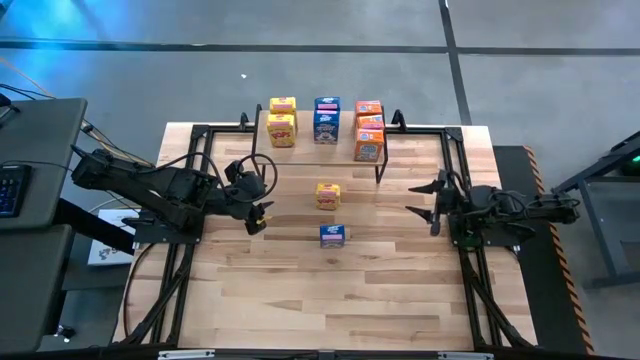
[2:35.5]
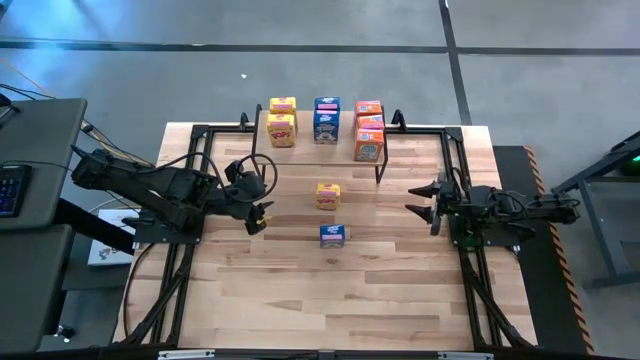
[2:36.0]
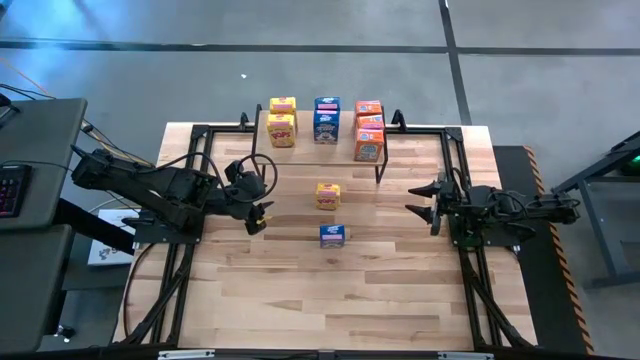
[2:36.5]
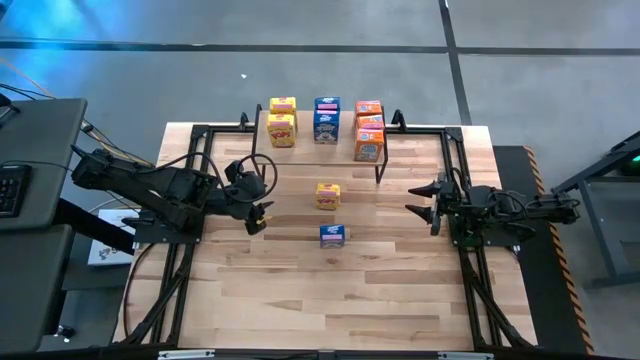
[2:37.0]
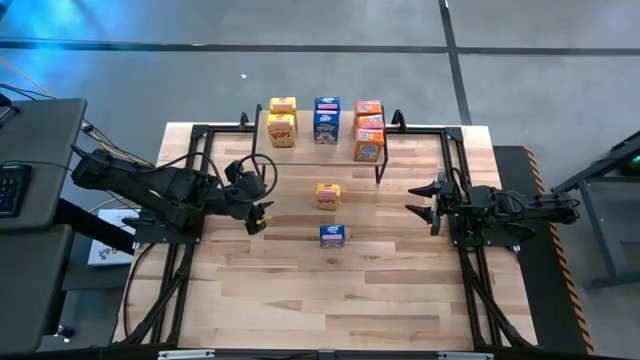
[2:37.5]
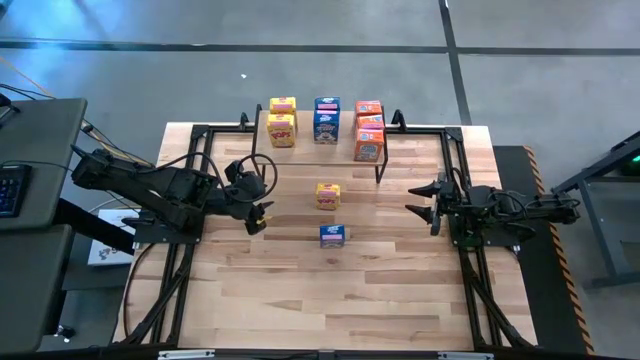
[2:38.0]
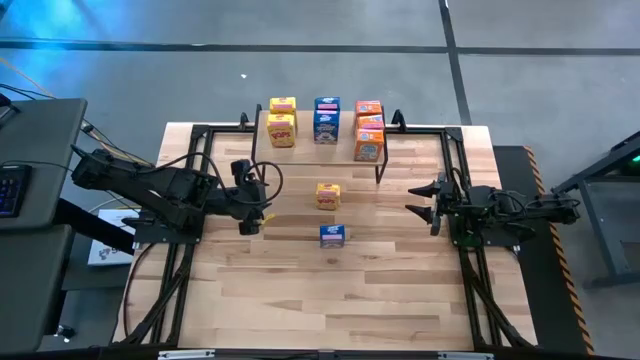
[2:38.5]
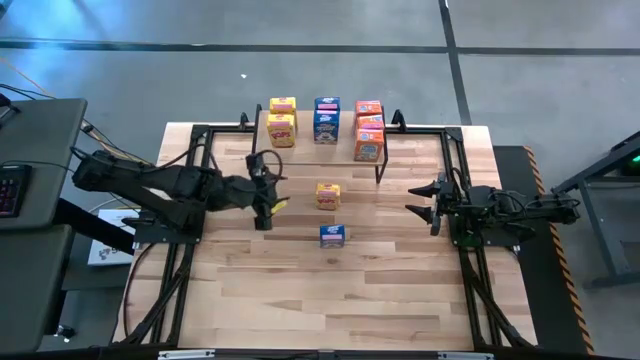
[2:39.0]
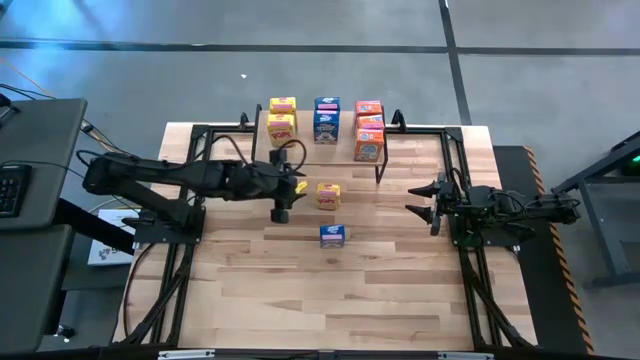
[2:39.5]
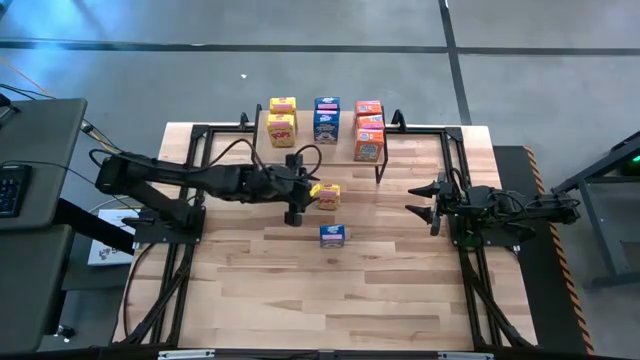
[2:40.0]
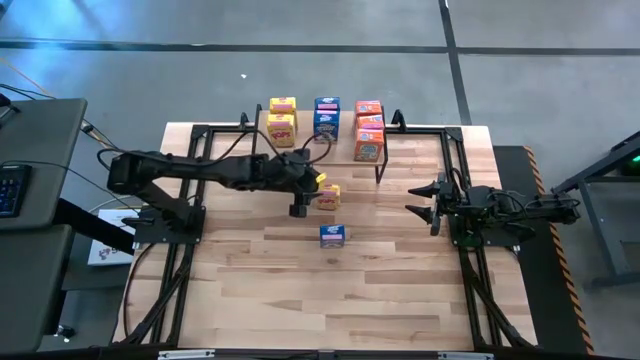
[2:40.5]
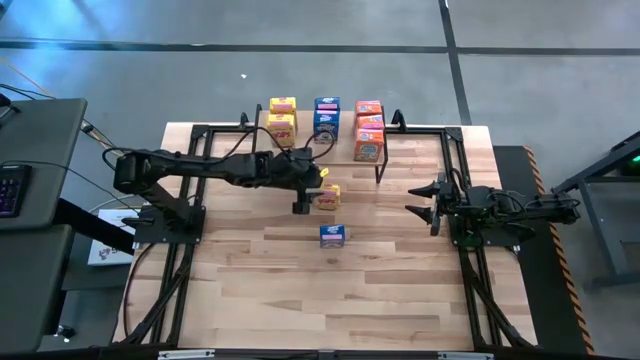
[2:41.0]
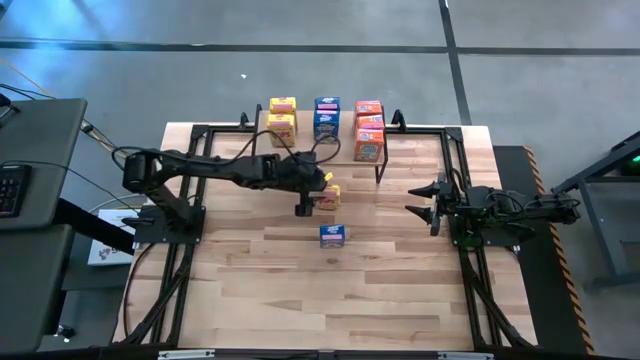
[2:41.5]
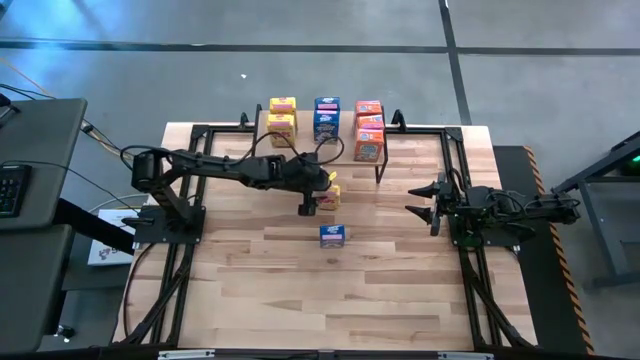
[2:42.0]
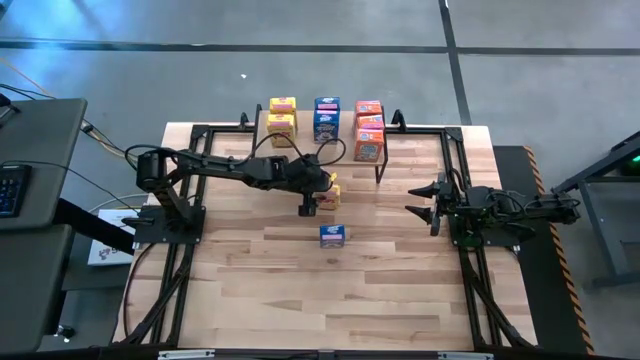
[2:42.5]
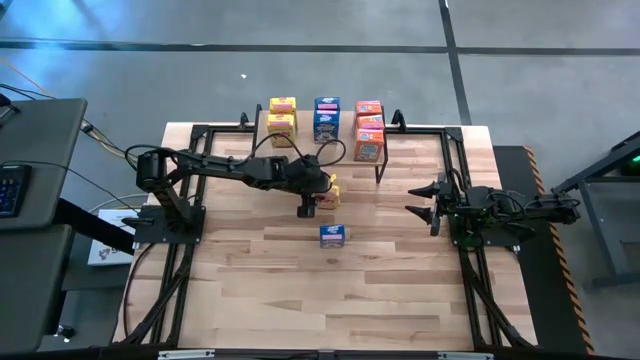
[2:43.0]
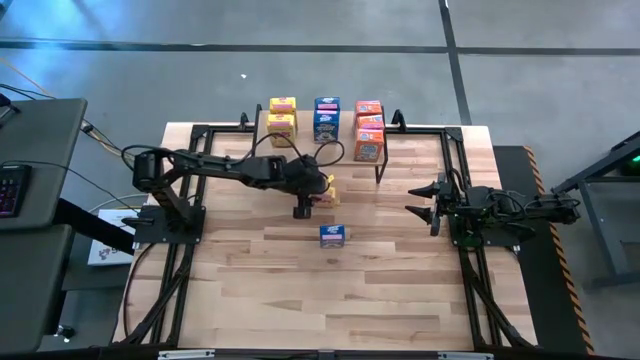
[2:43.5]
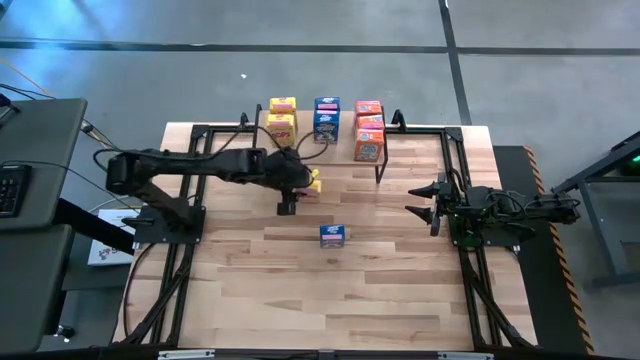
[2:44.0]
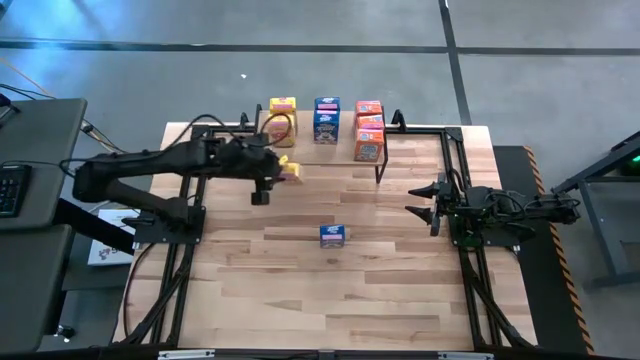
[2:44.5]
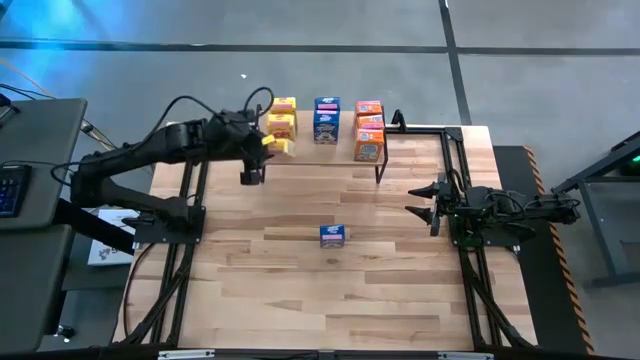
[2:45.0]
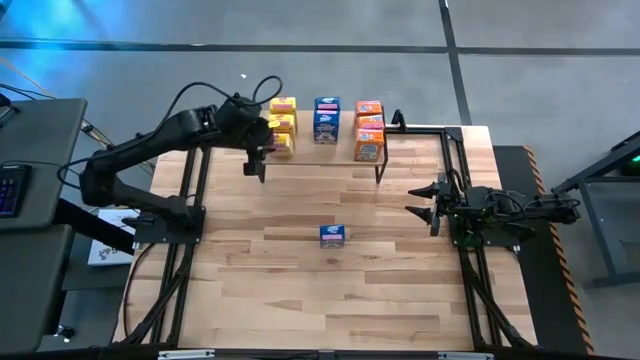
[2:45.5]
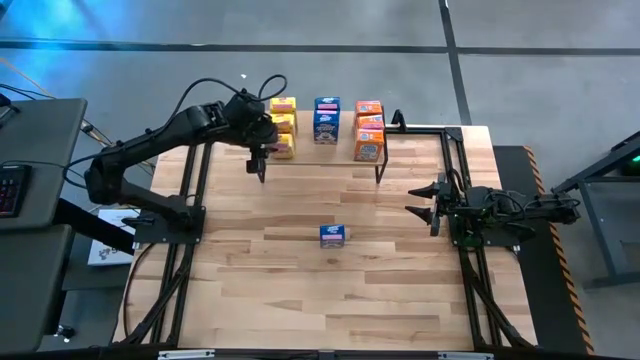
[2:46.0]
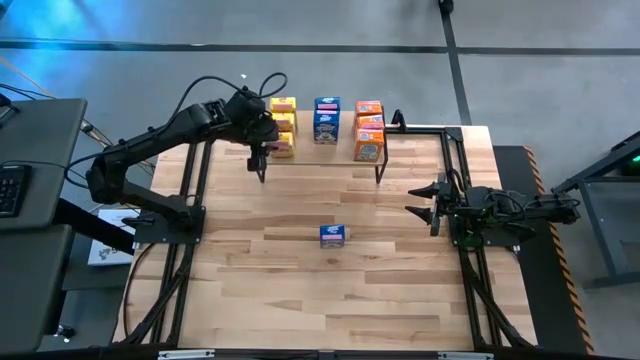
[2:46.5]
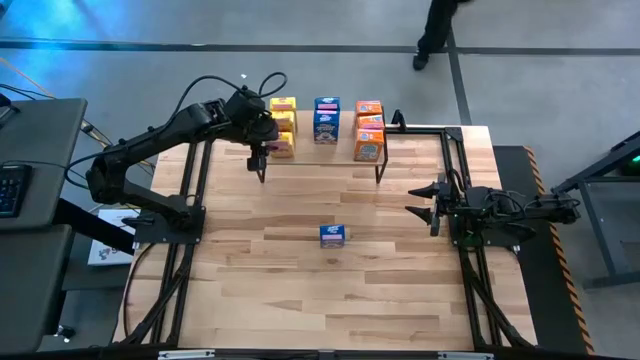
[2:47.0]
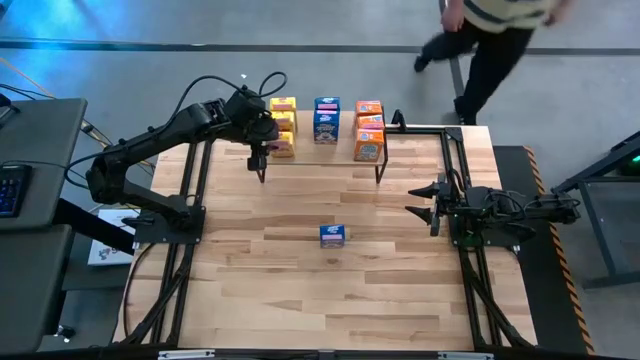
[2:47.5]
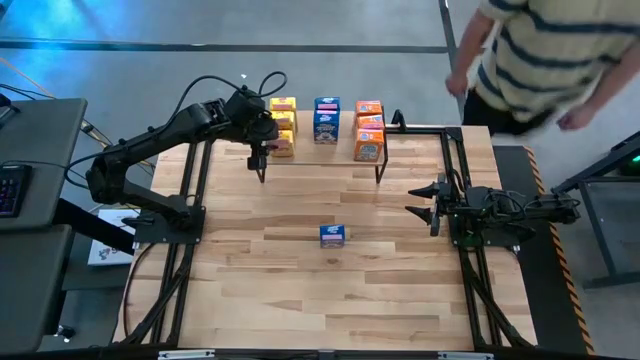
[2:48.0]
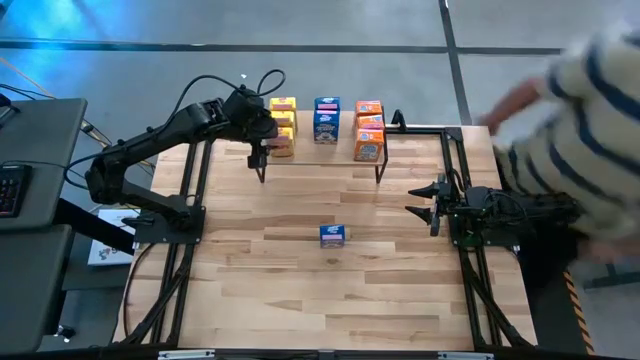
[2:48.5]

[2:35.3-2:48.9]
Task: Stack cereal on shelf
Put the yellow cereal box on the shelf aligned with the other yellow cereal boxes

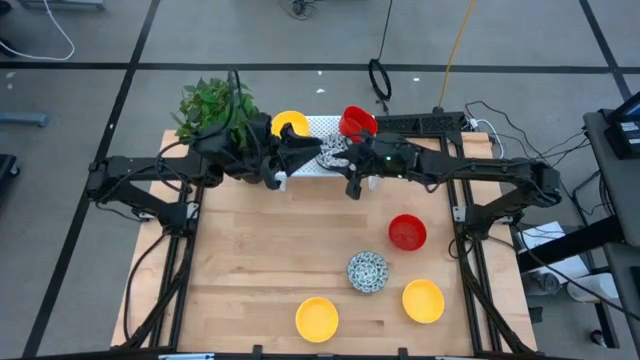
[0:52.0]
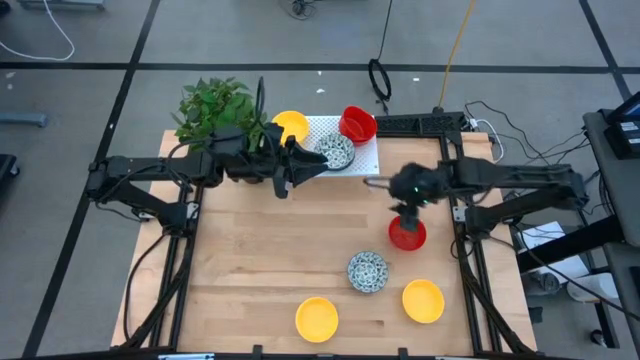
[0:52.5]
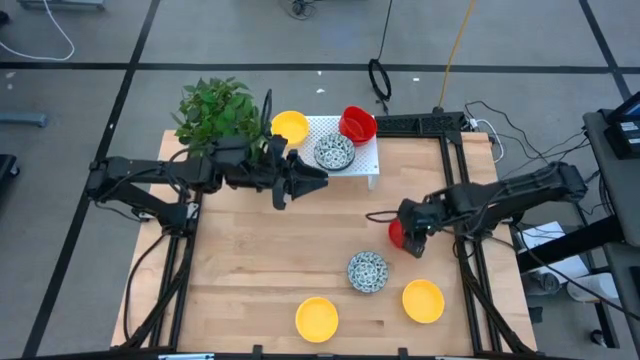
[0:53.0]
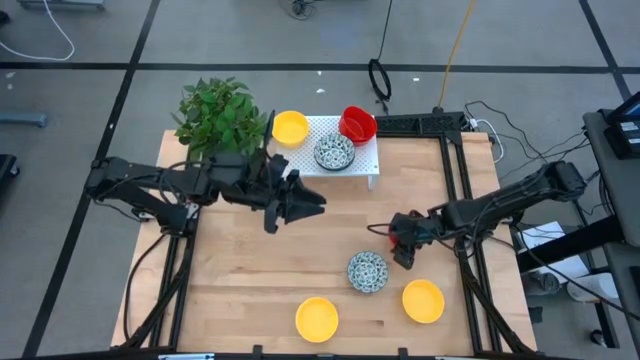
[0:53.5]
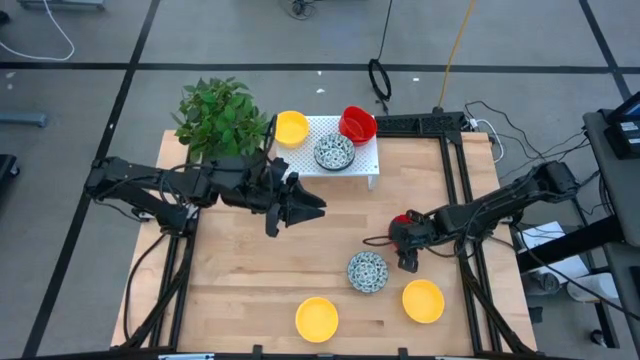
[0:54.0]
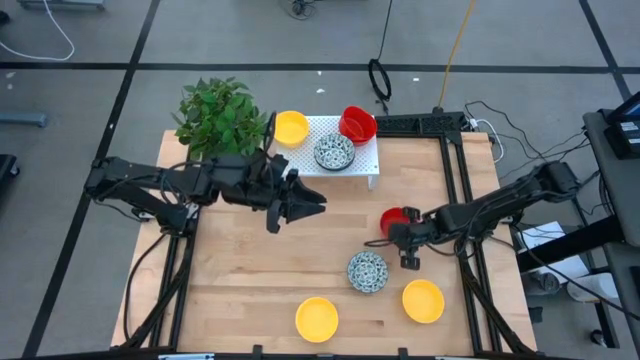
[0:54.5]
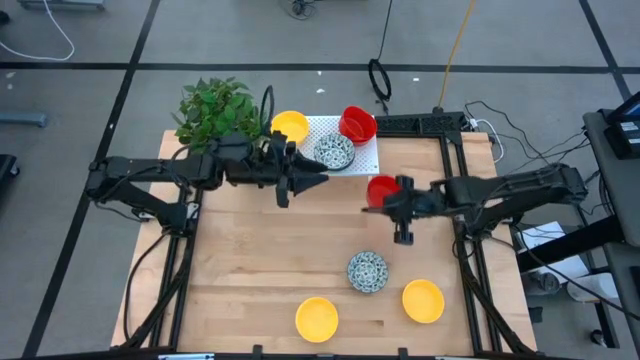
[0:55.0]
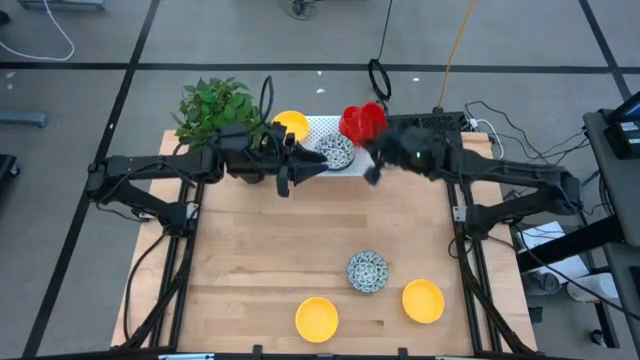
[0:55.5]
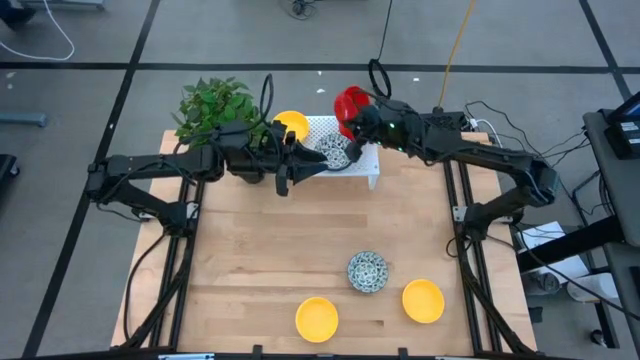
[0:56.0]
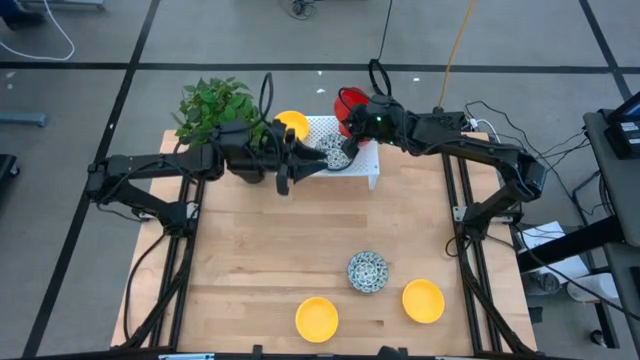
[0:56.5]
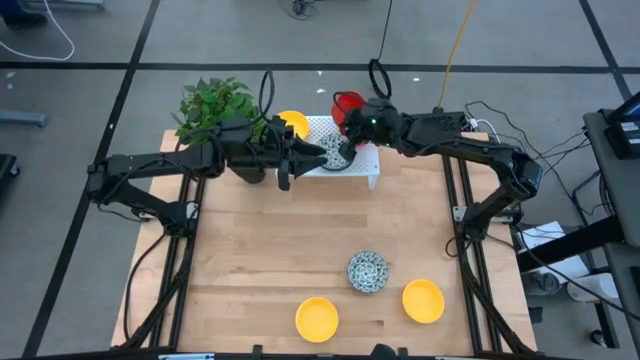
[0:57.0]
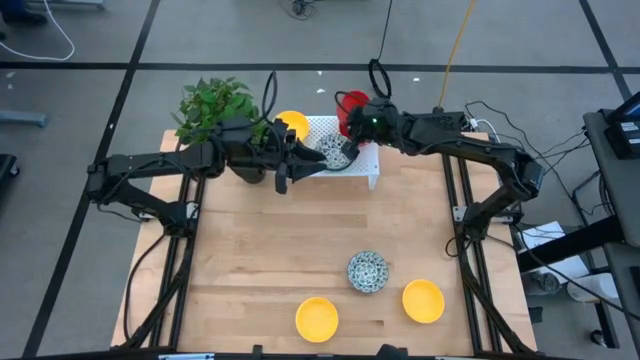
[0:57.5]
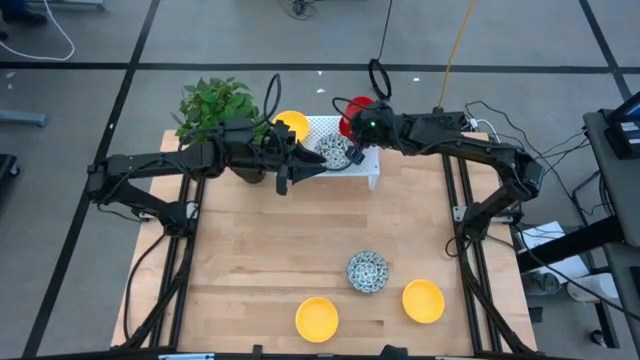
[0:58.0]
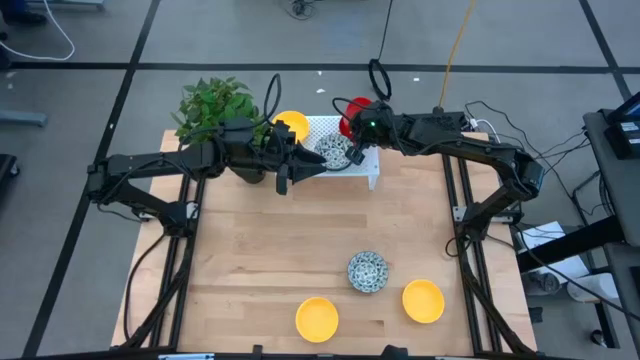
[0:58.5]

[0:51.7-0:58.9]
Task: Pick & Place Mini bowls
Stack the red bowl on the red bowl on the shelf

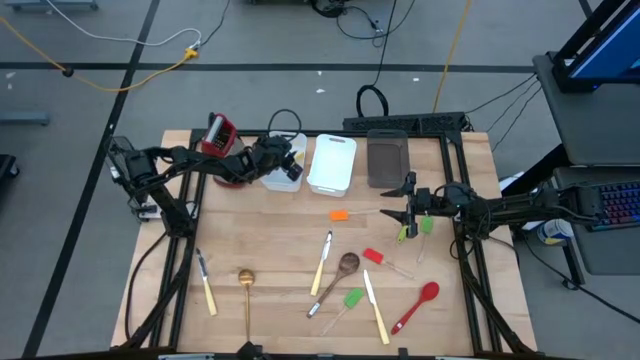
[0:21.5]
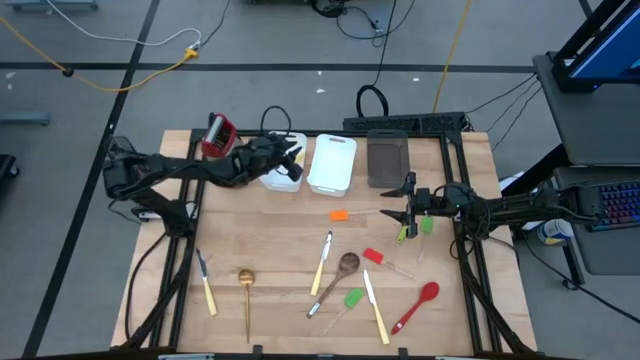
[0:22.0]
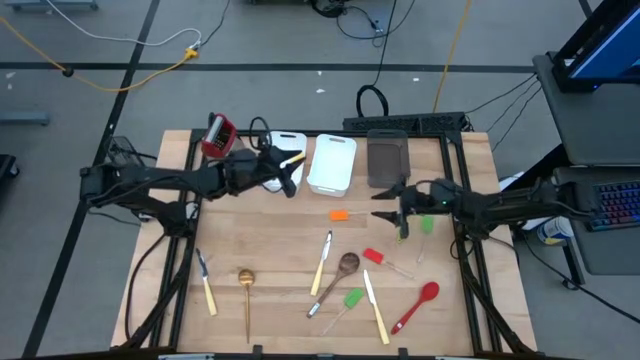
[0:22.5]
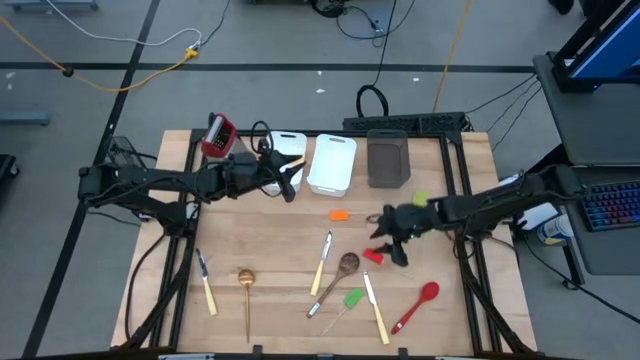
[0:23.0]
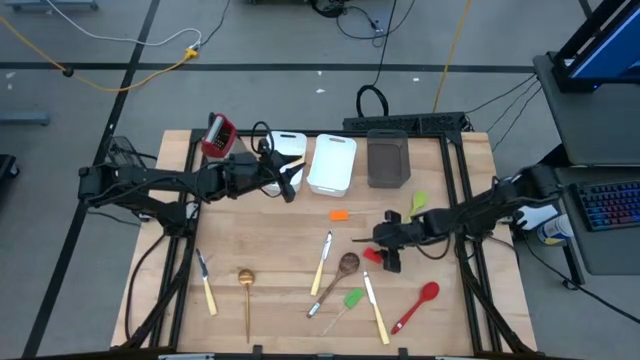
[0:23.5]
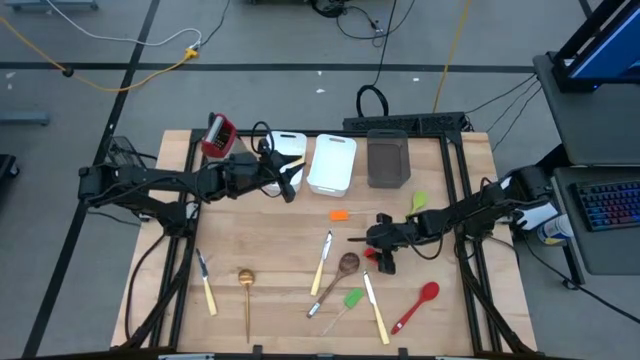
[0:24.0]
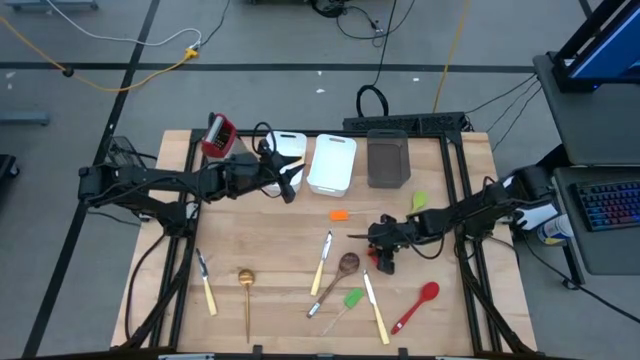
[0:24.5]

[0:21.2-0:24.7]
Task: Pick & Place Kitchen Items
Put the red spatula into the left white bin
